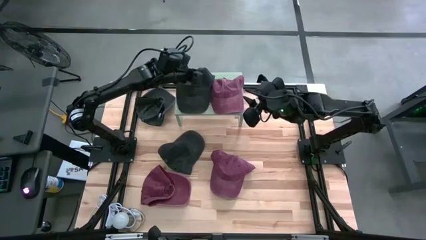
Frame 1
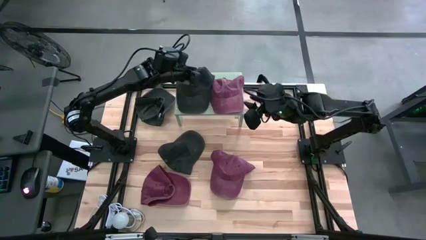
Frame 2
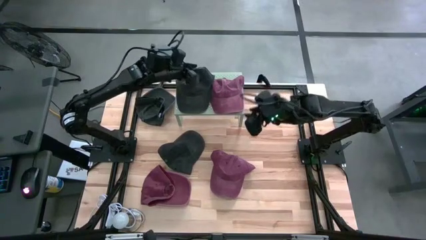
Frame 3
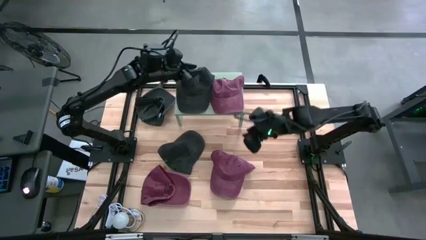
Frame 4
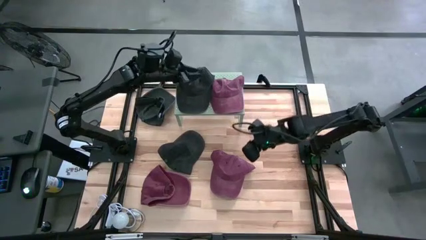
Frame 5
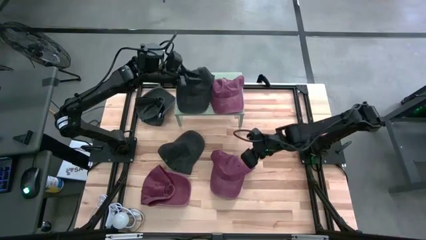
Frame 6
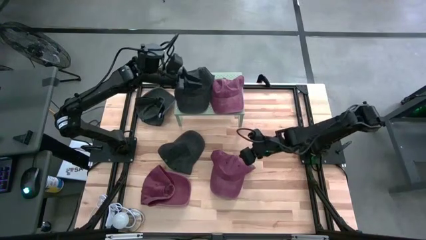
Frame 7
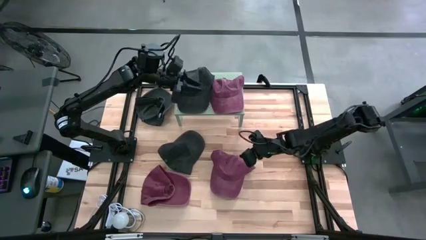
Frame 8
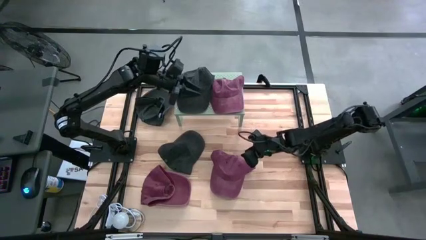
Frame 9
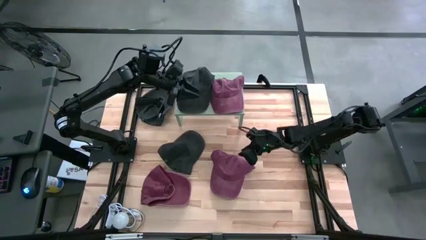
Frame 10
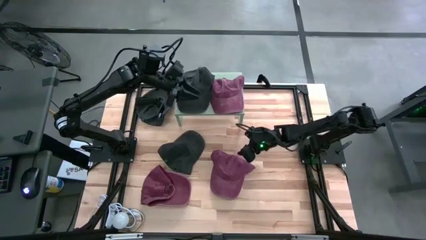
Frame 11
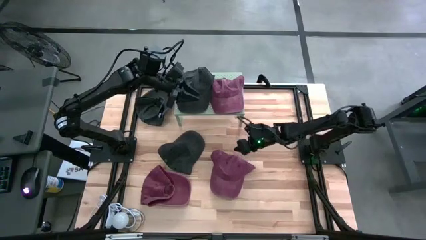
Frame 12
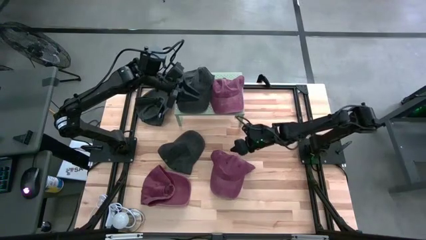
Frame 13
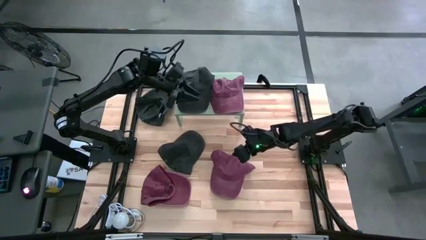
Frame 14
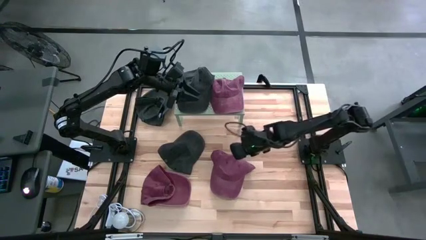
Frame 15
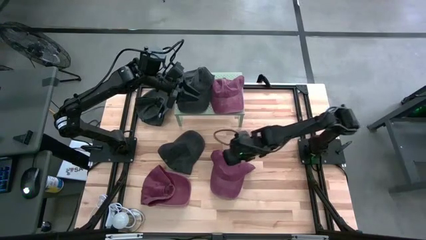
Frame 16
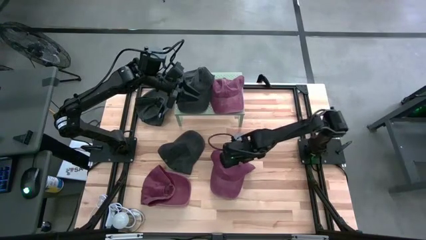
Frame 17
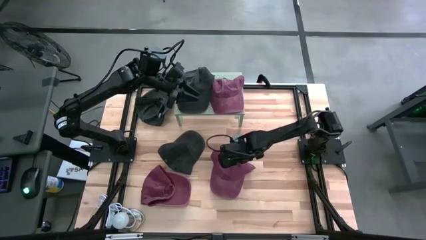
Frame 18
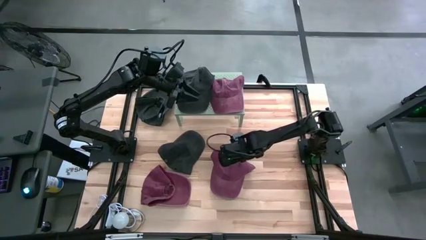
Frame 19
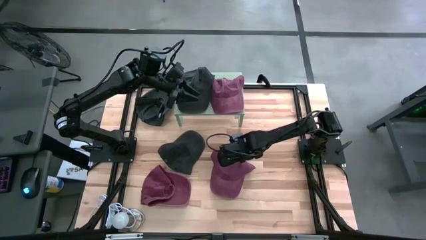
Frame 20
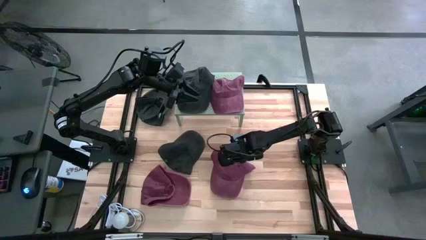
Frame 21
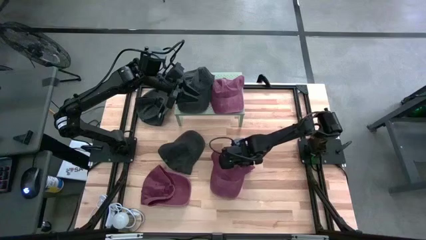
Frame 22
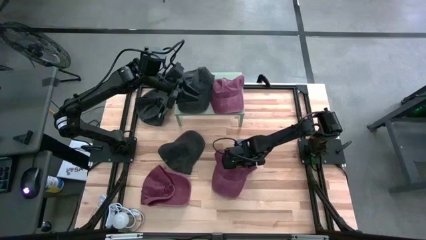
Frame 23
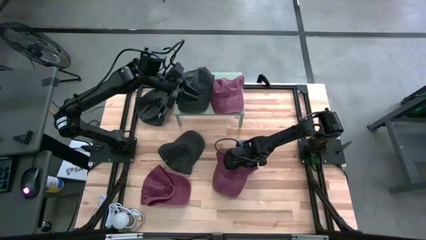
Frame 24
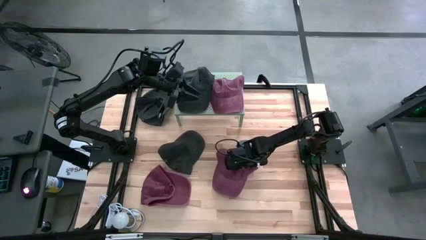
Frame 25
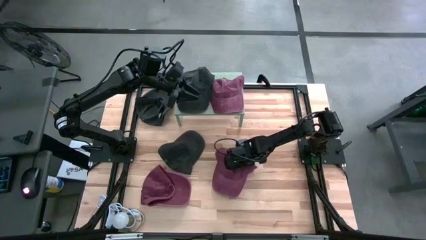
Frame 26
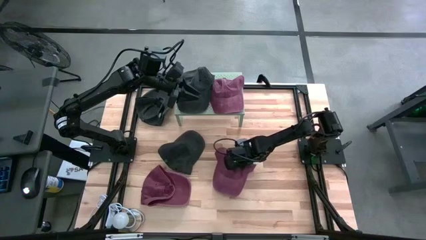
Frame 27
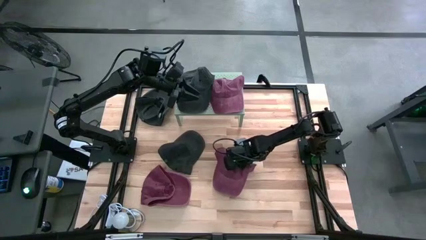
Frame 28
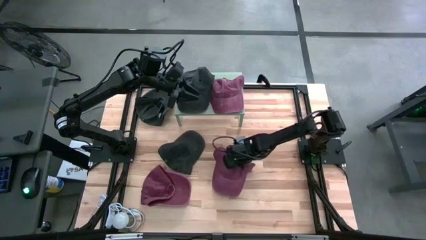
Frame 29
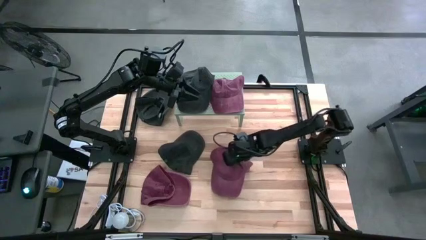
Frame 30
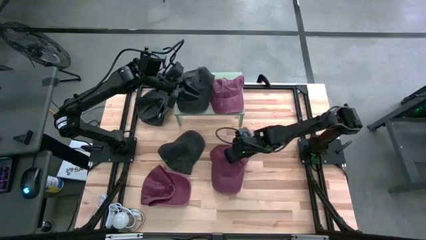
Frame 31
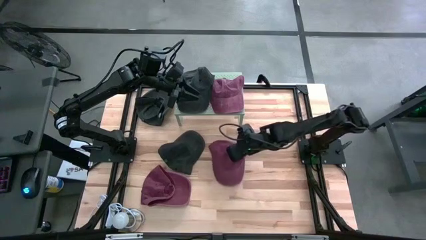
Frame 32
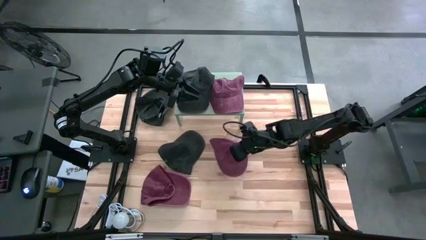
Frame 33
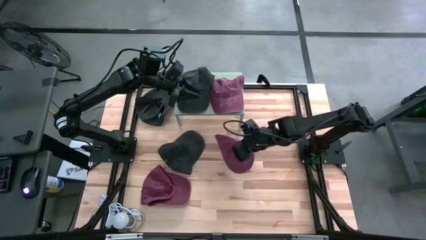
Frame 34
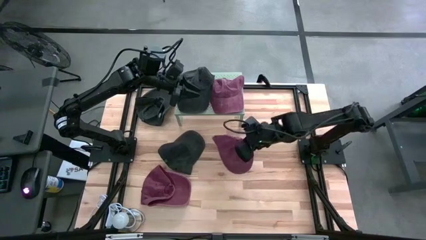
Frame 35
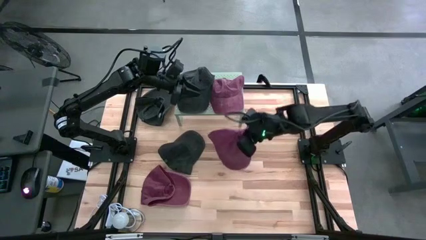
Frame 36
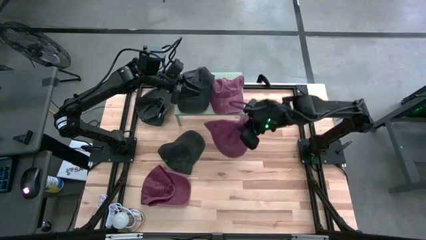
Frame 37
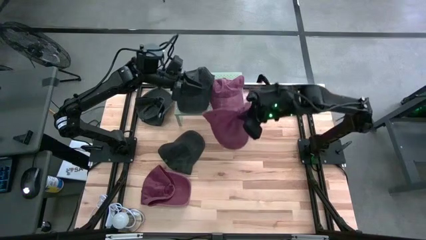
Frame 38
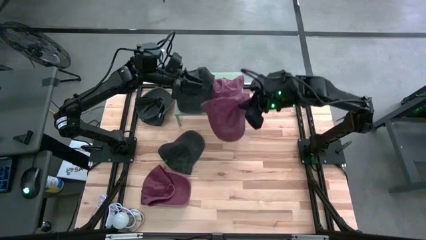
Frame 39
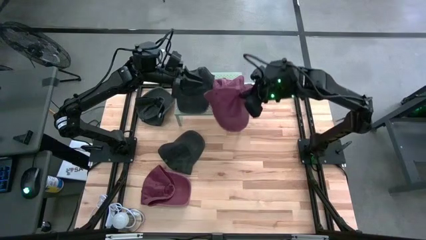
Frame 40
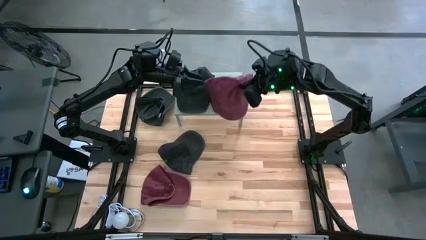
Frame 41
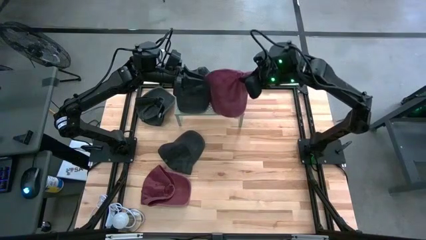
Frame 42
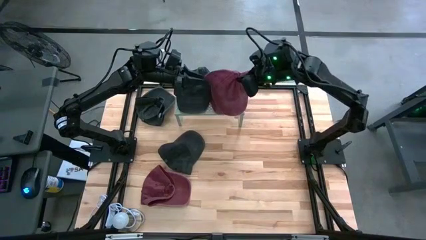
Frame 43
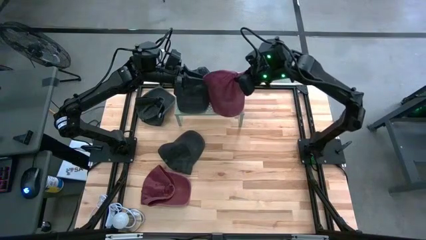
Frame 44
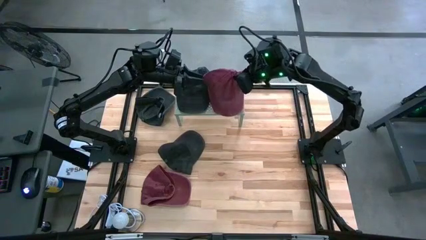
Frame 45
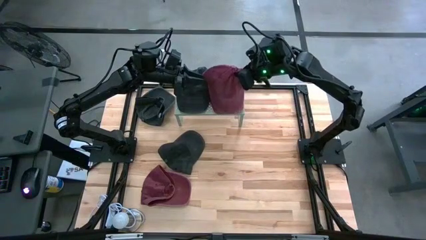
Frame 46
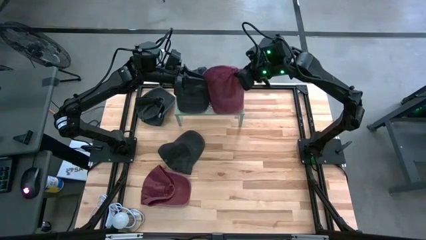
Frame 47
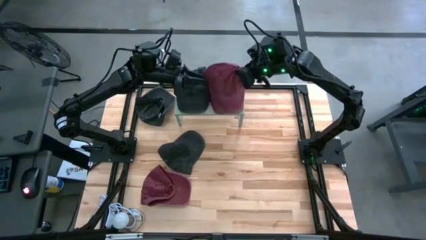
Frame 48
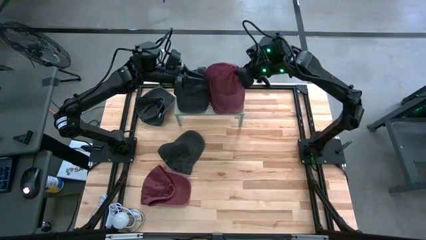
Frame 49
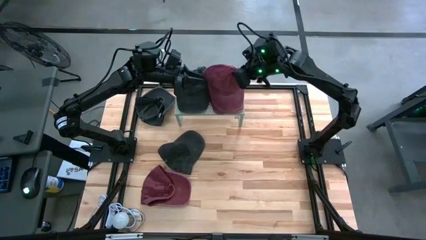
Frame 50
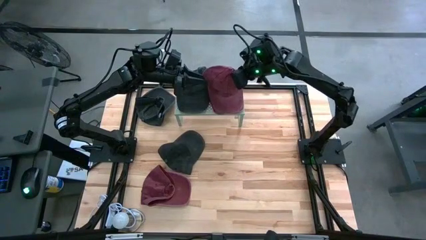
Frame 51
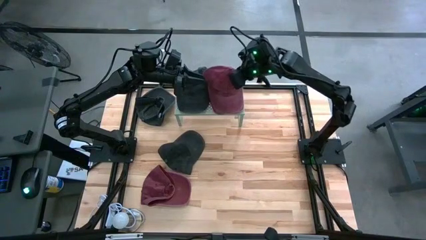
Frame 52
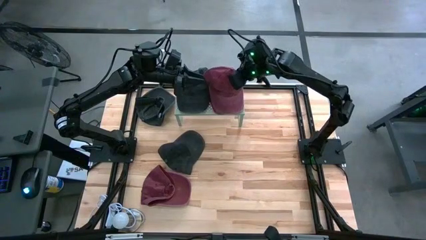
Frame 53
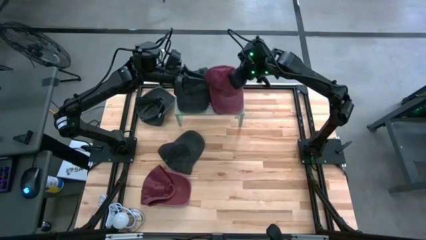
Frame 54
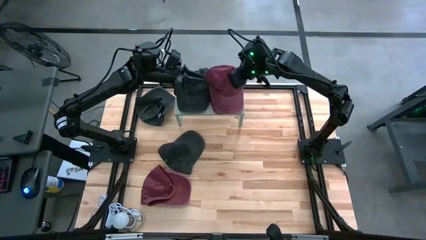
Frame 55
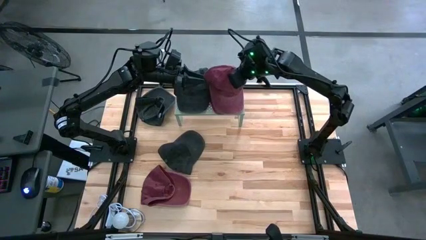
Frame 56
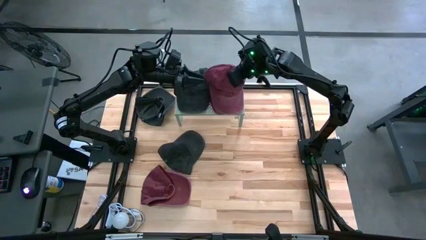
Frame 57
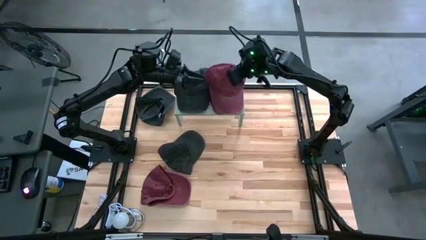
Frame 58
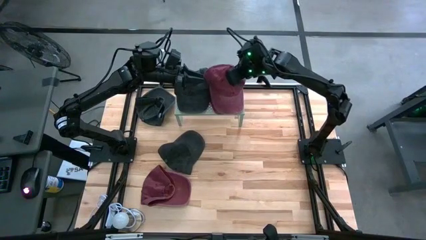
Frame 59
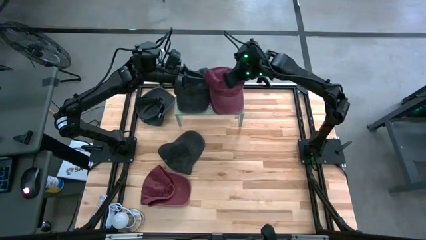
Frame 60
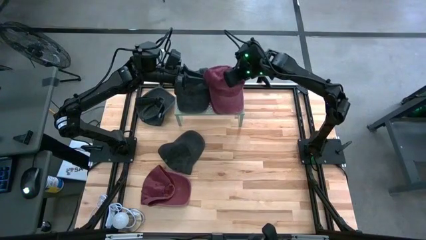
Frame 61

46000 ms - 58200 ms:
Task: Pick & Place hat
Stack the right red cap on the red cap on the shelf

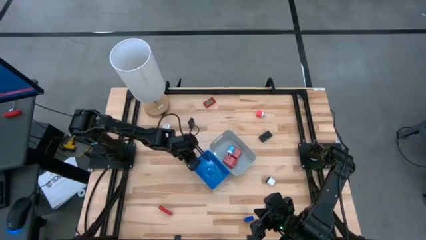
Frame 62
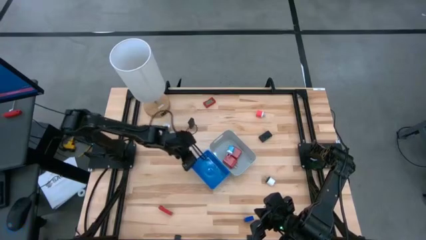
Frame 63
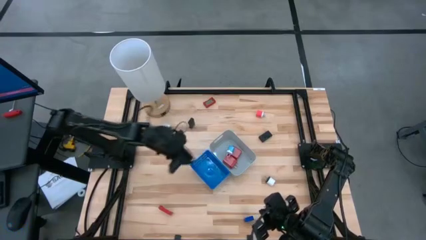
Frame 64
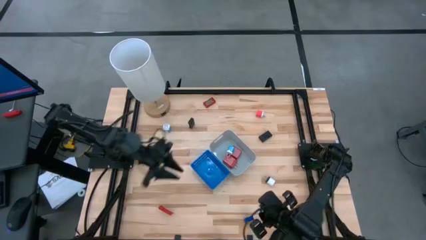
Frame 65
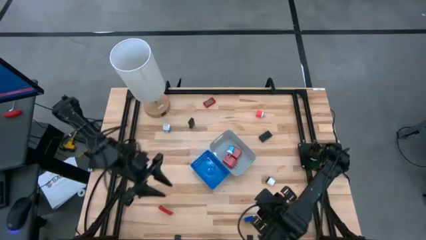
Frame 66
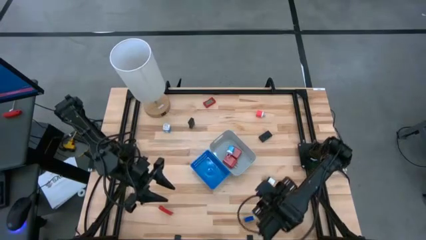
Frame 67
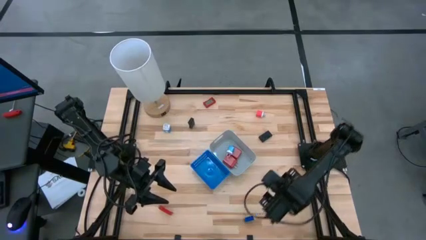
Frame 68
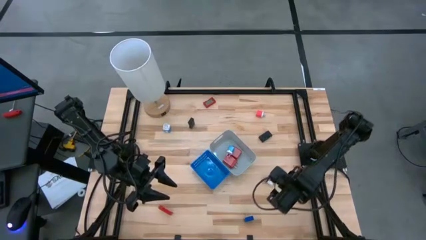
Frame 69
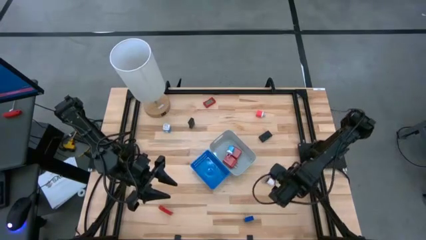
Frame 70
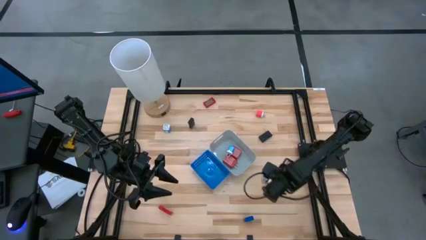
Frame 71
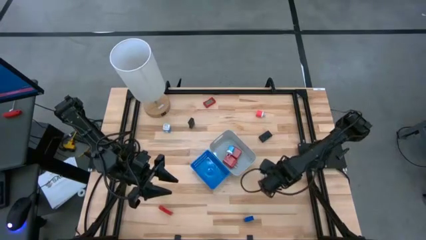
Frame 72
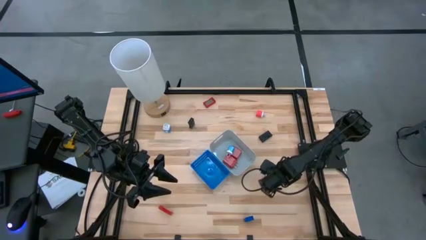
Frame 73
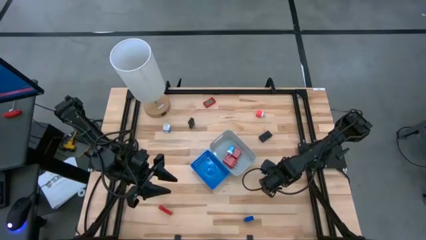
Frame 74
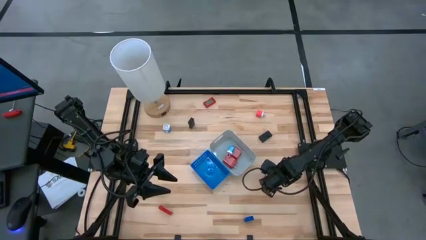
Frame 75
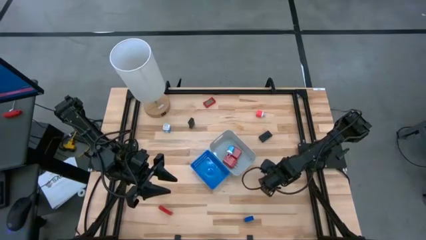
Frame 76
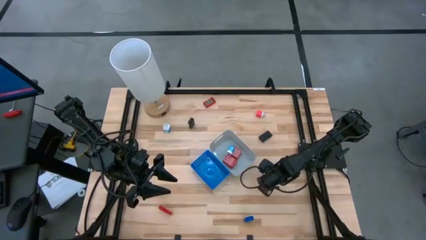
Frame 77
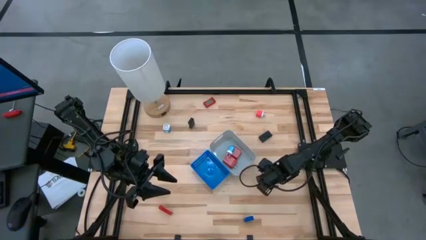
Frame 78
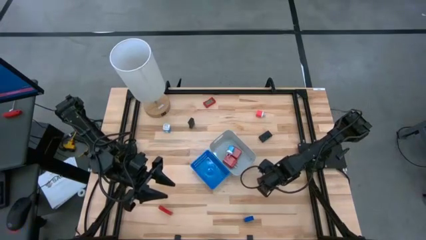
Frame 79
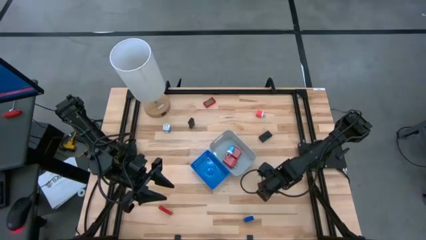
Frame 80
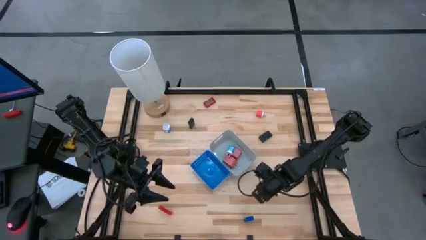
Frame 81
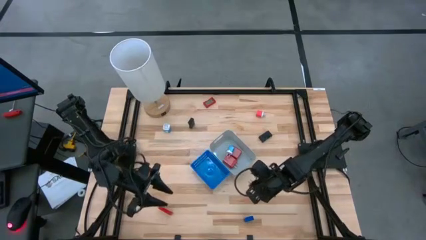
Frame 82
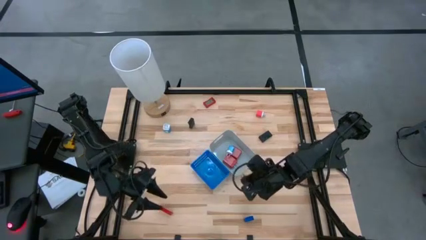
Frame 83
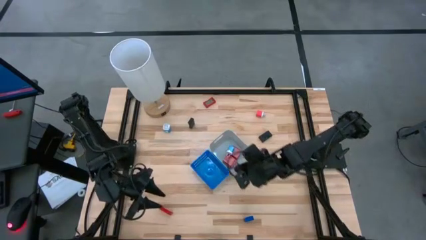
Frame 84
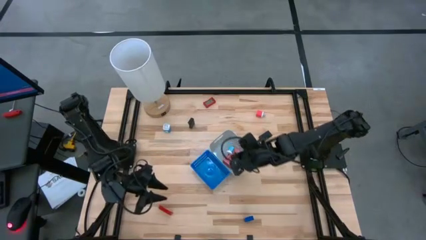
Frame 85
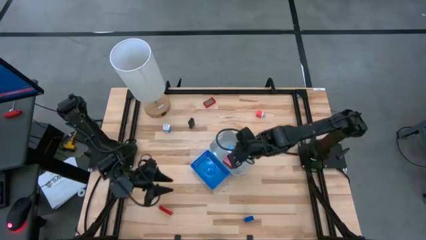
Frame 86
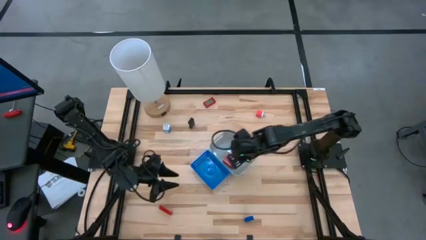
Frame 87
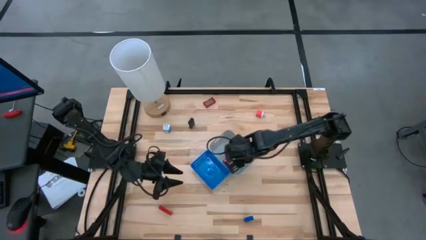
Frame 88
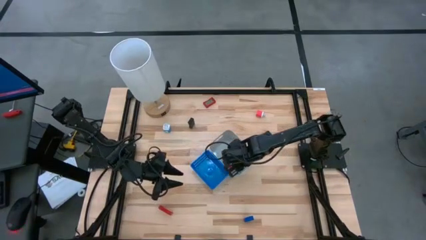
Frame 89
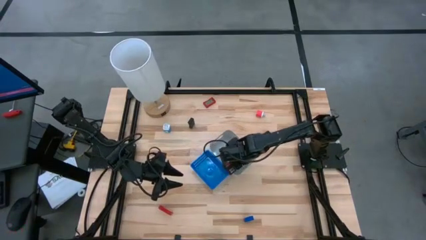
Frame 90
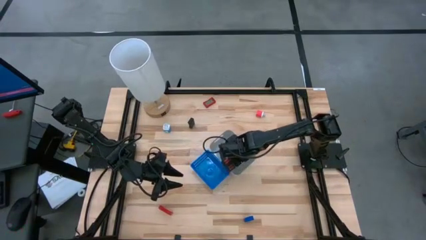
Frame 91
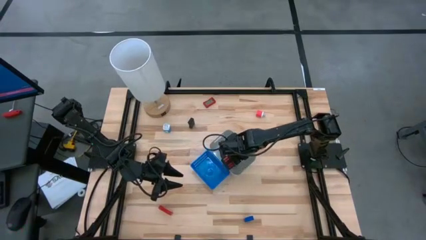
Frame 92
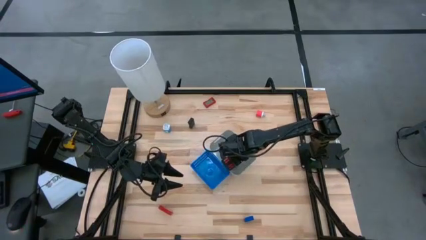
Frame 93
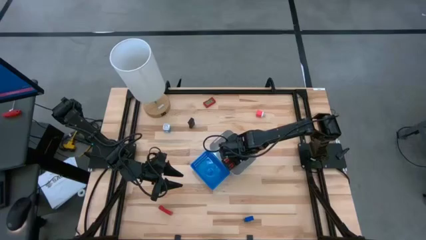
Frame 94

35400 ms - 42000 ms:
Task: Pick & Place Office items
Put the white charger adapter into the gray bin
